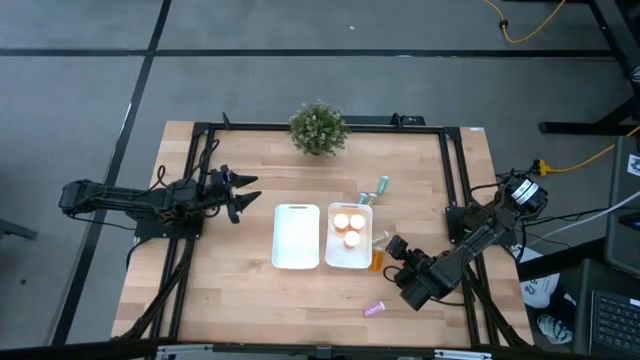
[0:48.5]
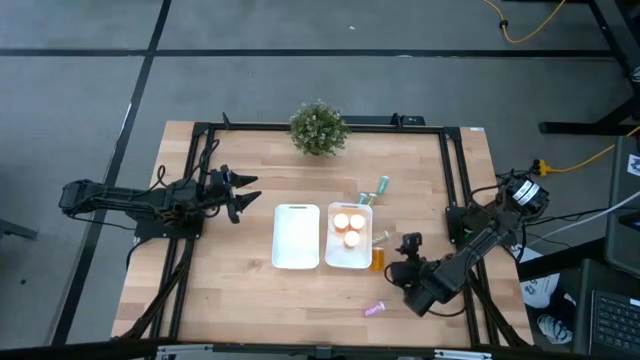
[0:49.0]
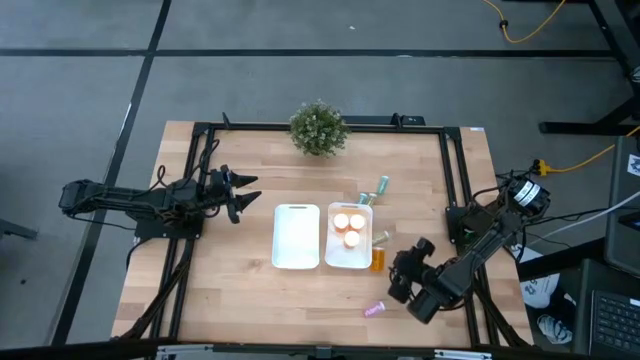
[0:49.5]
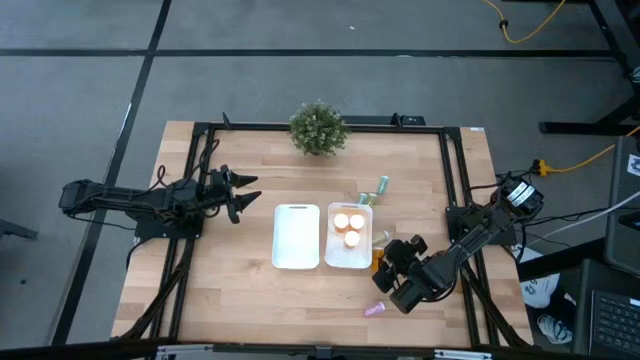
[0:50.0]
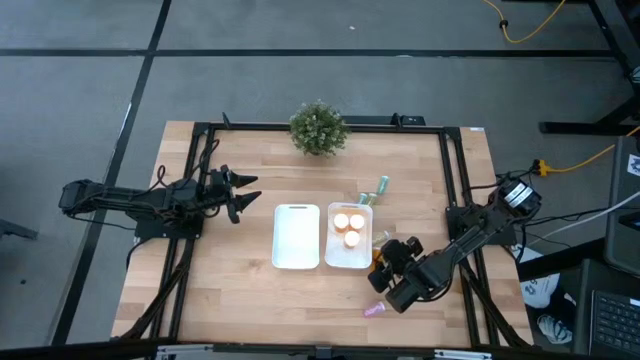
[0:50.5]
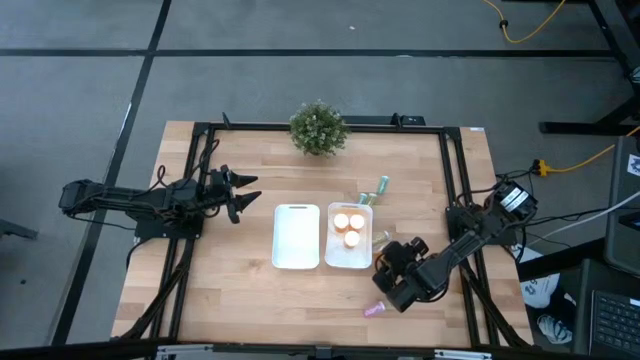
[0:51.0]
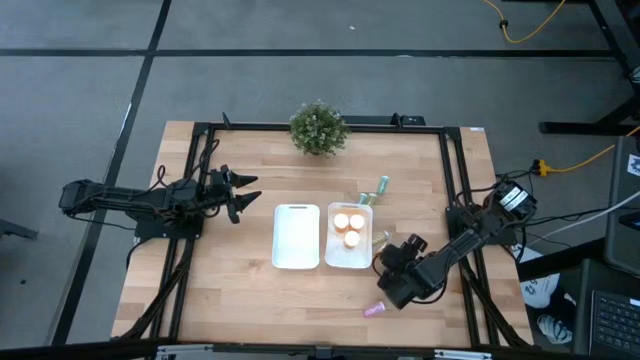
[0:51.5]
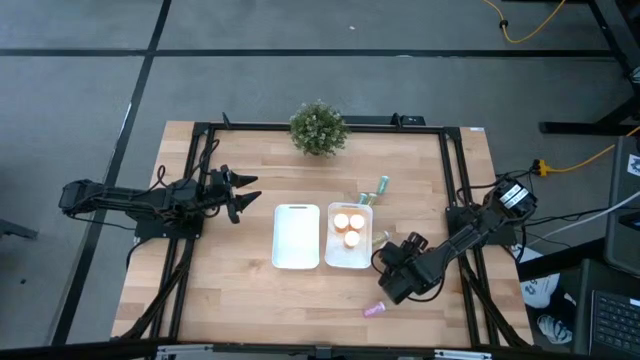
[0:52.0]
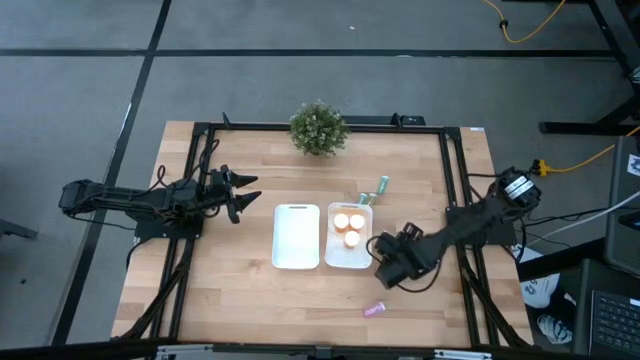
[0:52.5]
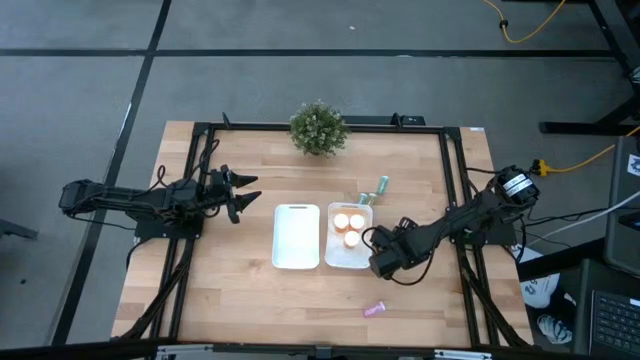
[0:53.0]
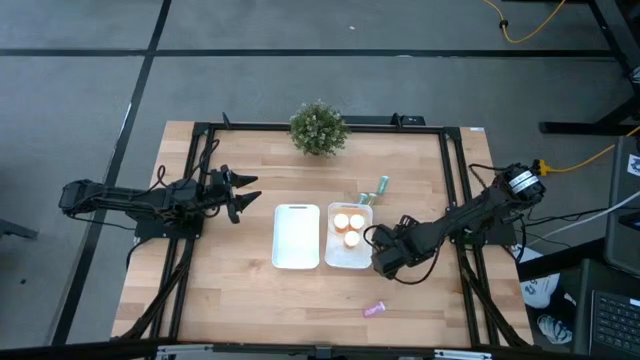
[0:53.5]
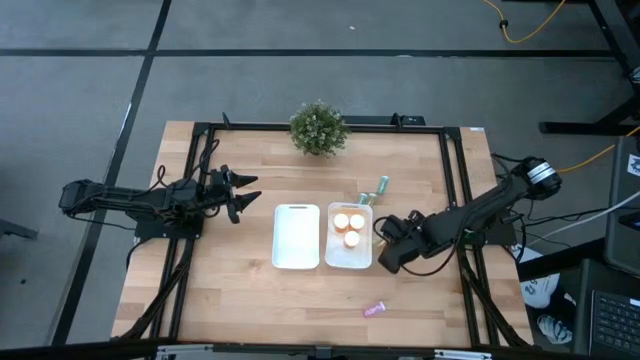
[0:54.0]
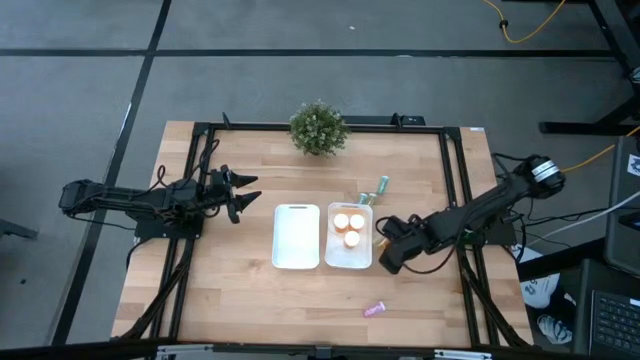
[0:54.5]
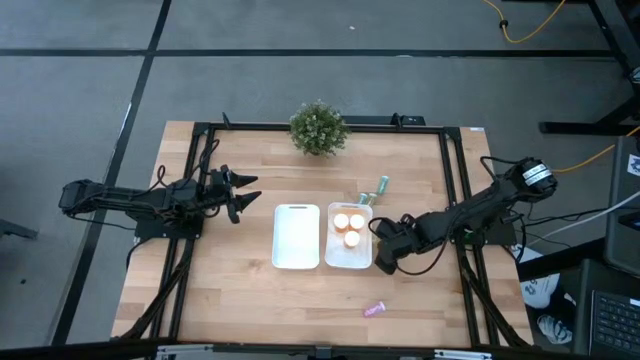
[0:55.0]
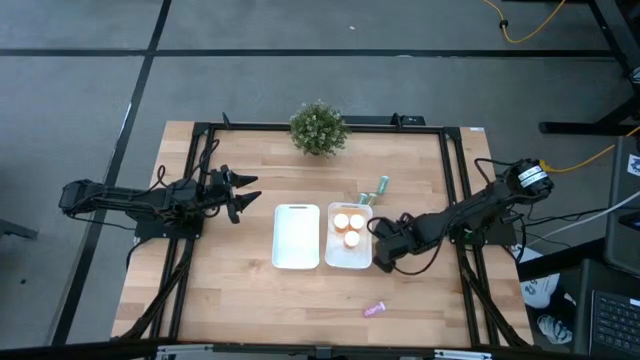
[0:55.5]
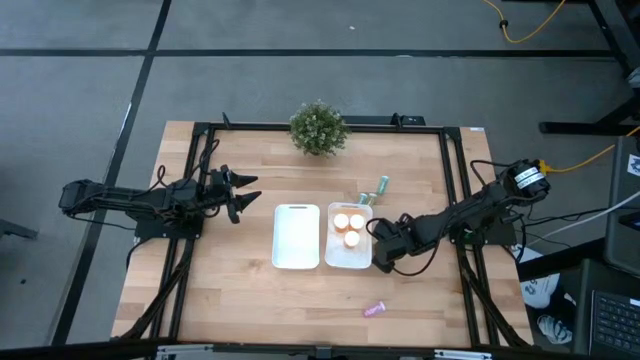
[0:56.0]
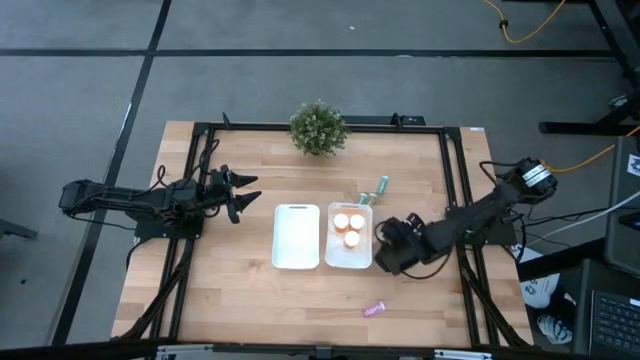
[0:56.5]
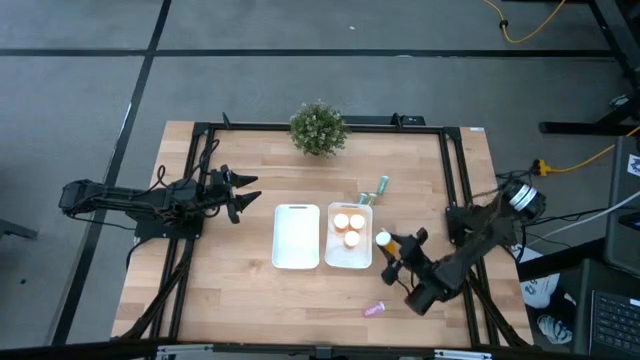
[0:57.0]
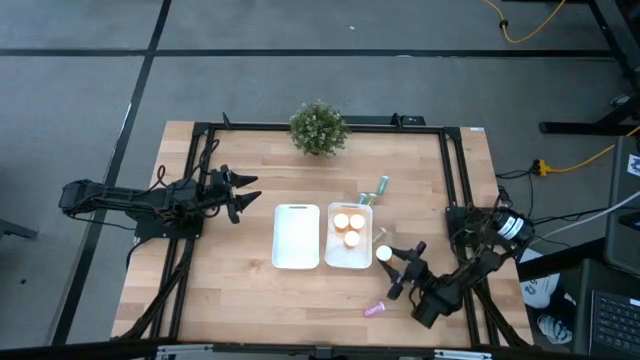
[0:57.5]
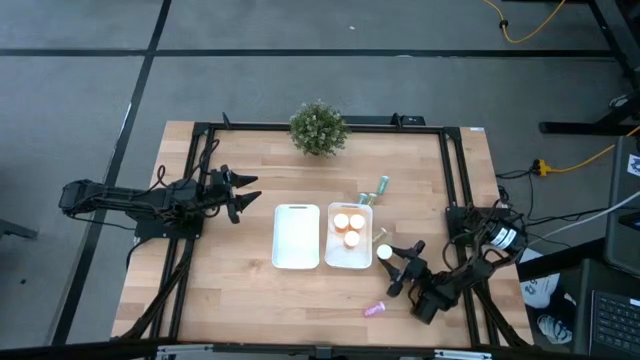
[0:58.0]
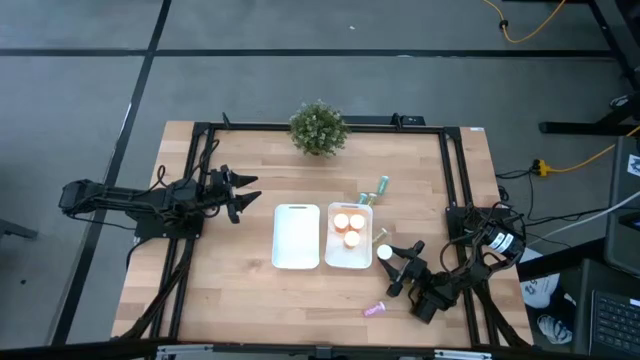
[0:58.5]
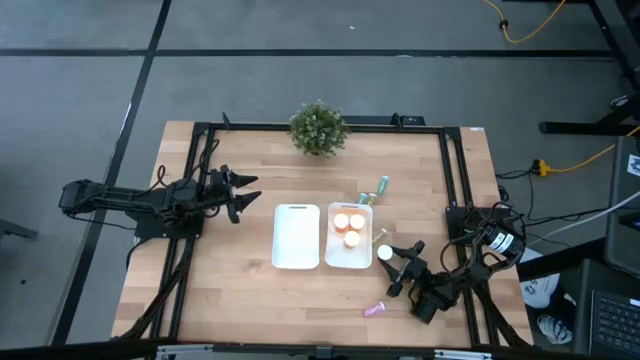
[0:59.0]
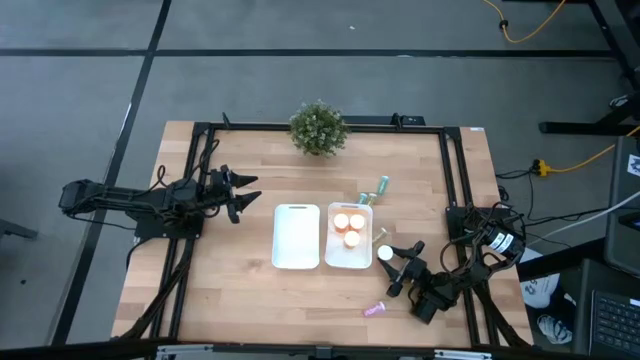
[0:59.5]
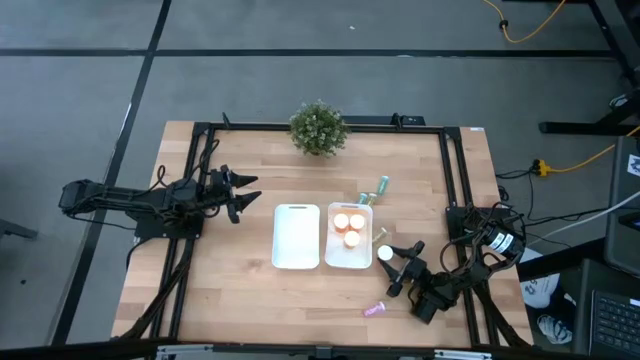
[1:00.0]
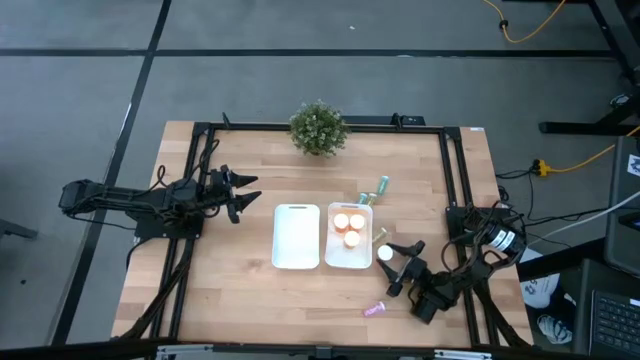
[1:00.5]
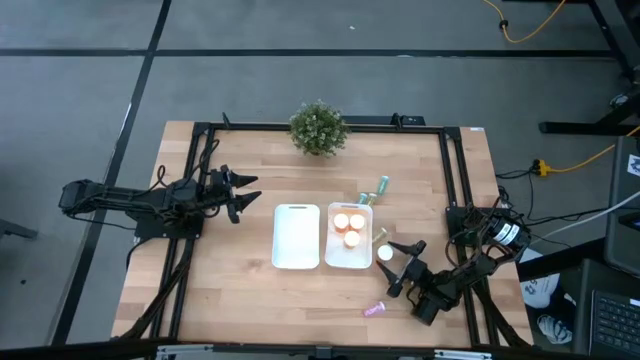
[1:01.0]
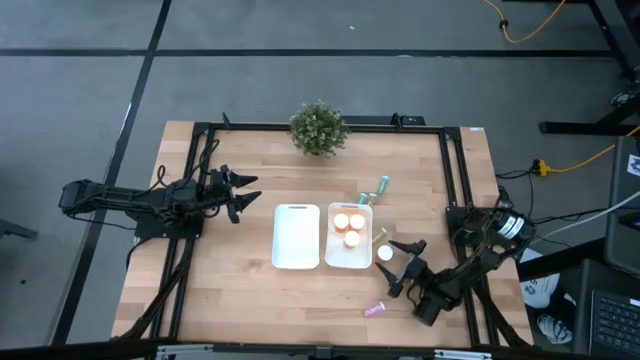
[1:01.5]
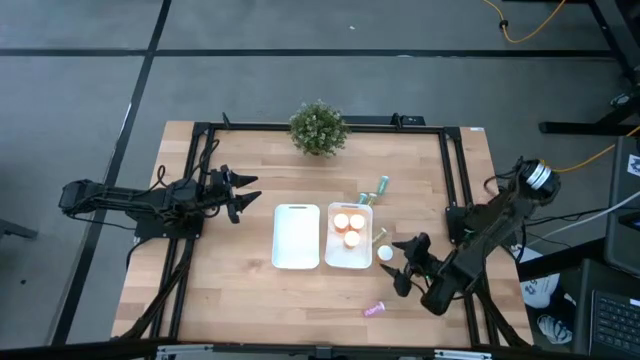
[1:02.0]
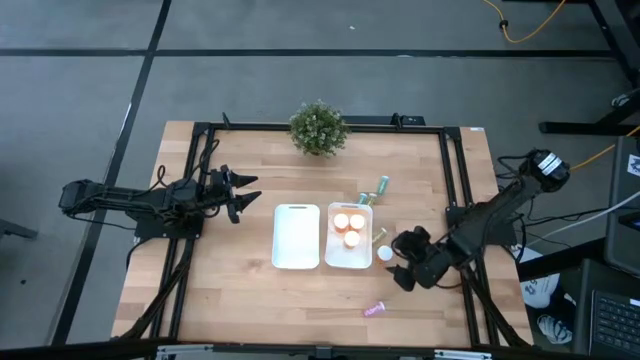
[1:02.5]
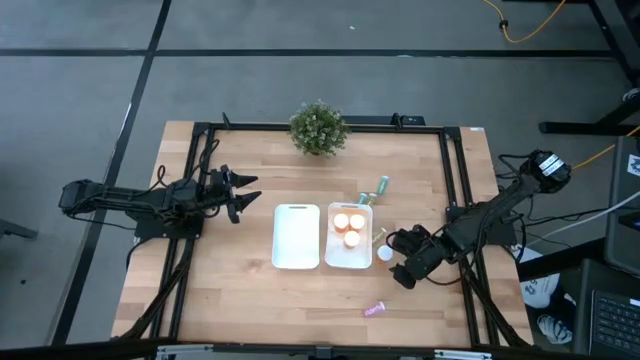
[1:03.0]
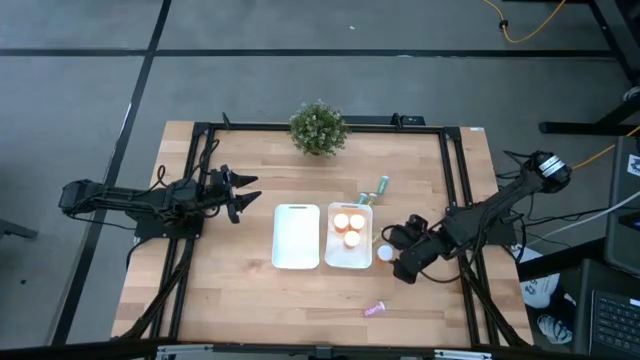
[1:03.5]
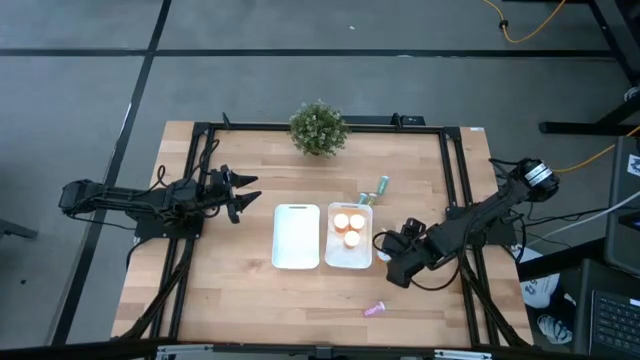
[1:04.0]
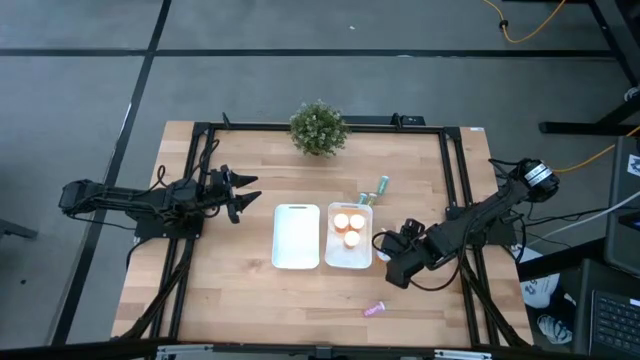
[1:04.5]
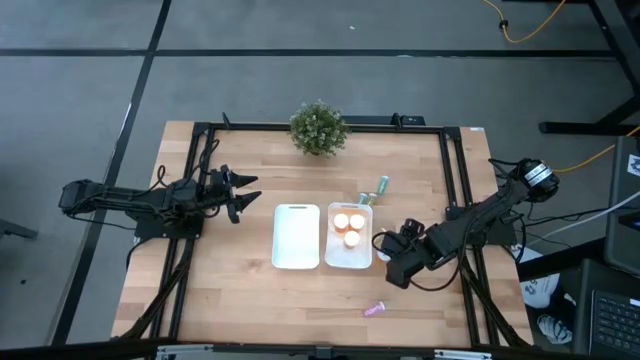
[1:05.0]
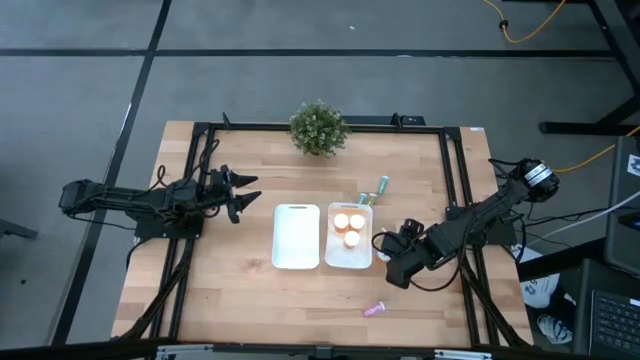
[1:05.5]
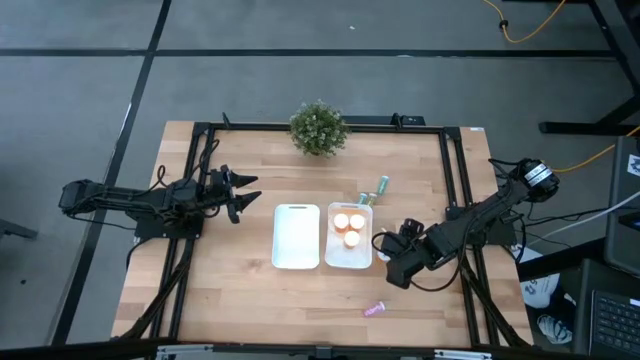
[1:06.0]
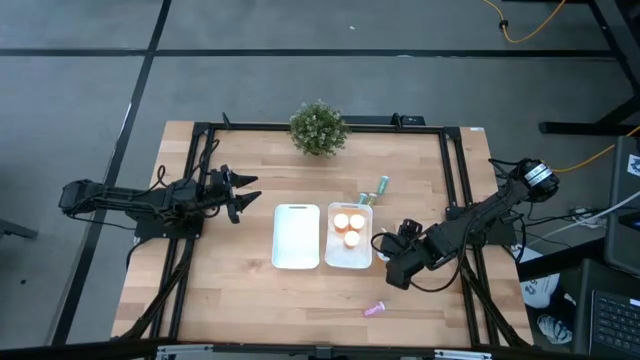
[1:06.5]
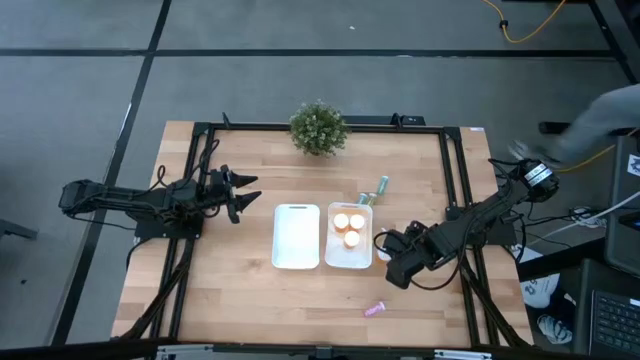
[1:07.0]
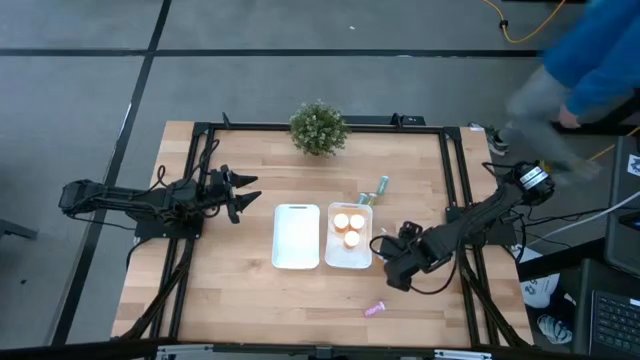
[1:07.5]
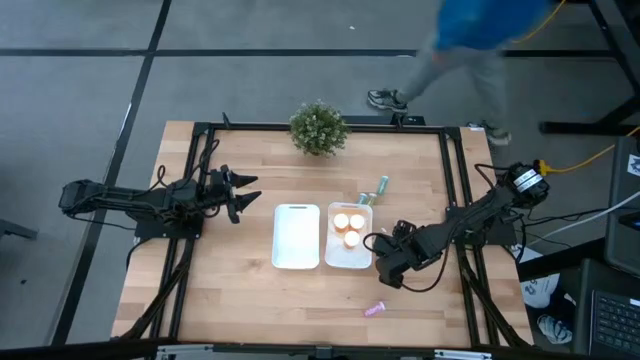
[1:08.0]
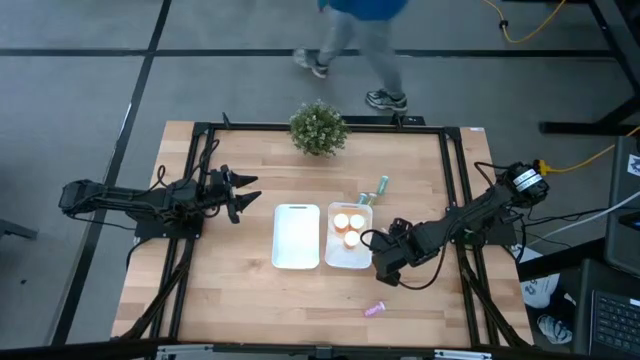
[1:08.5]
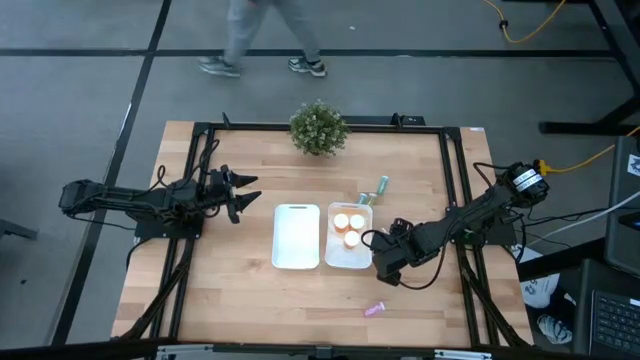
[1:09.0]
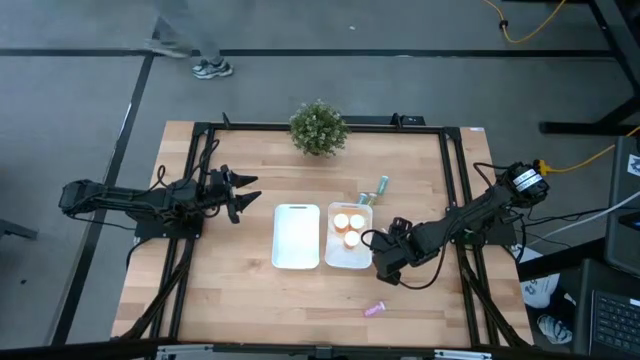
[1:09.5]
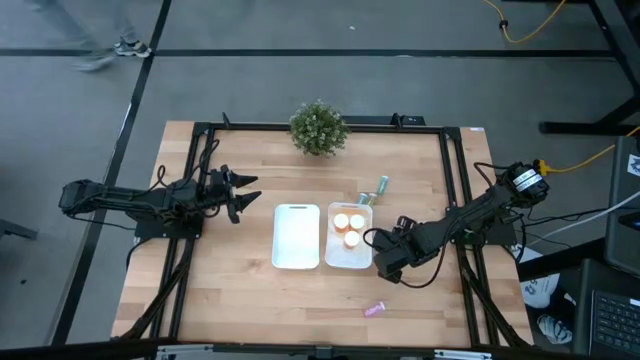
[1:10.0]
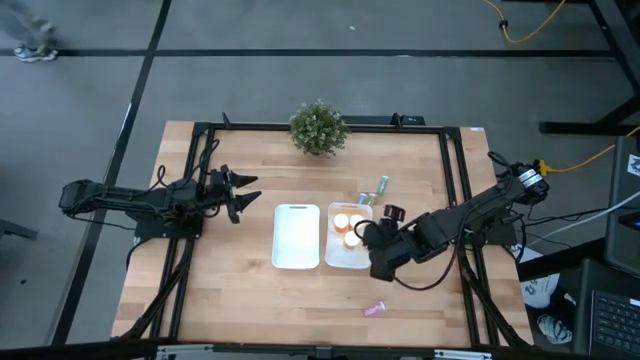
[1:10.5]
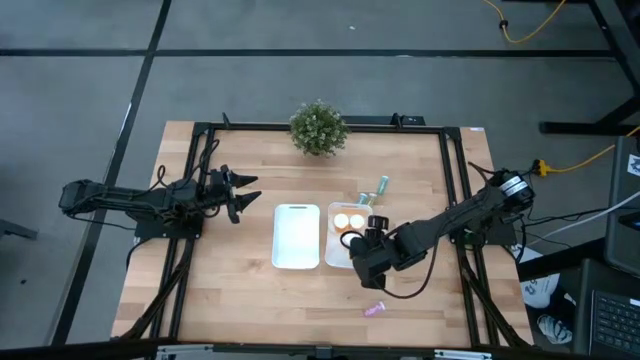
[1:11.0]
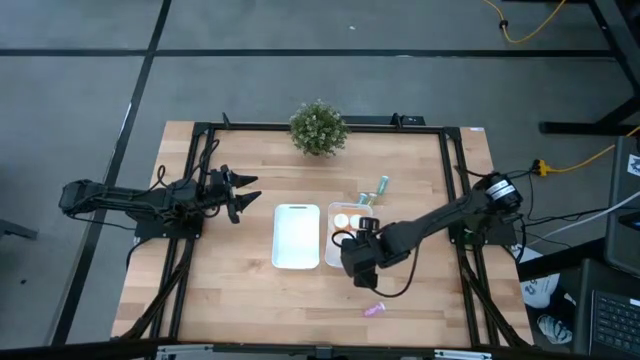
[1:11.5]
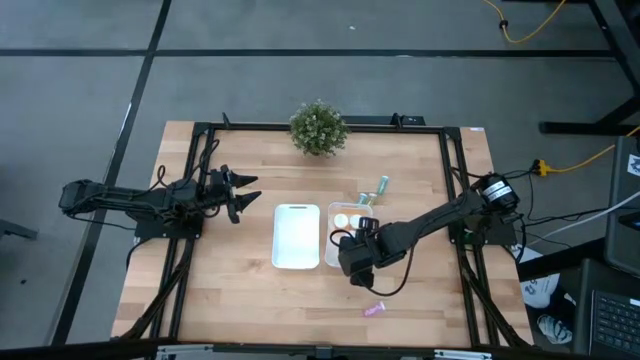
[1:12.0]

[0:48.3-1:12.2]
Task: Pick and place medicine bottles into bin by pill shape (circle, oval)
Put the orange capsule bottle into the right white bin
